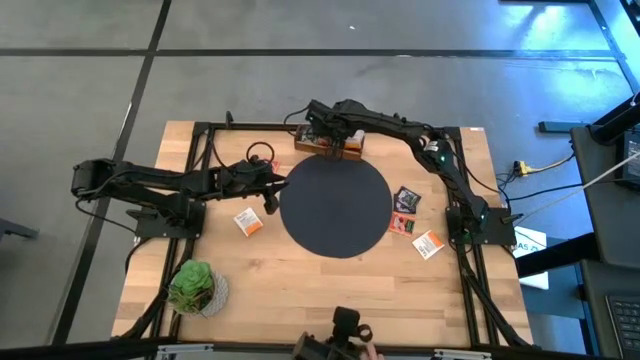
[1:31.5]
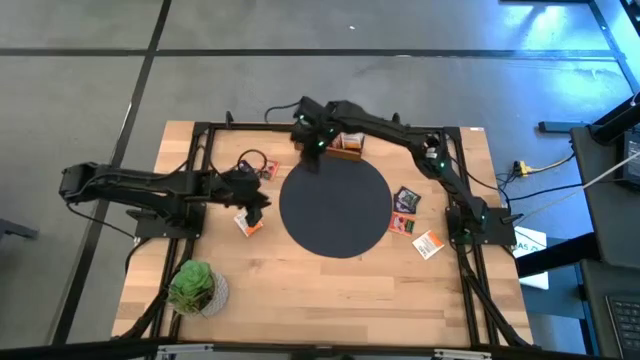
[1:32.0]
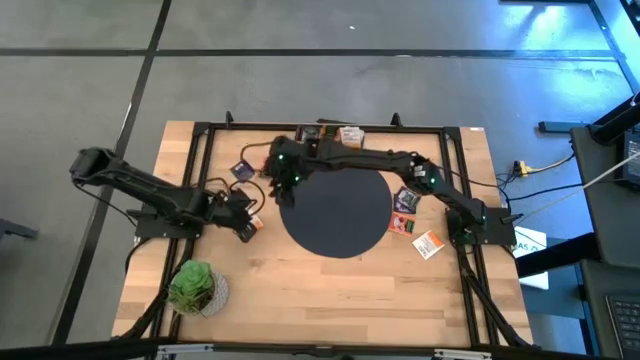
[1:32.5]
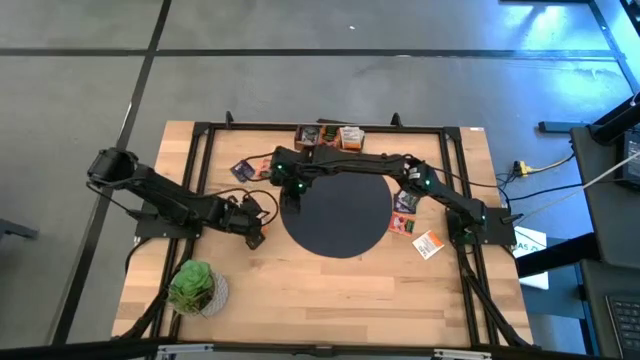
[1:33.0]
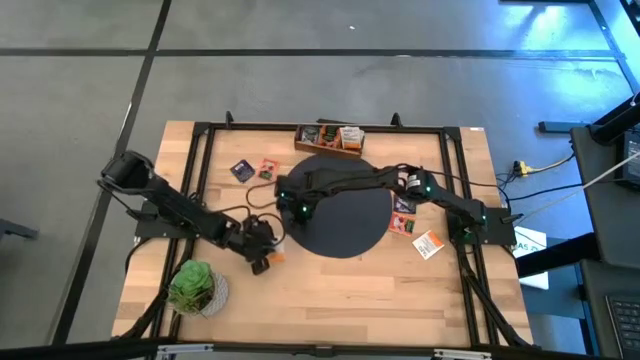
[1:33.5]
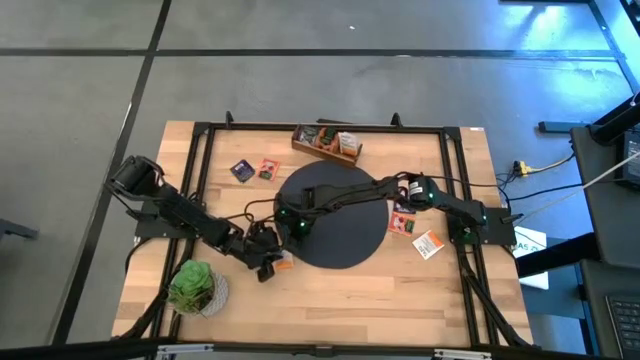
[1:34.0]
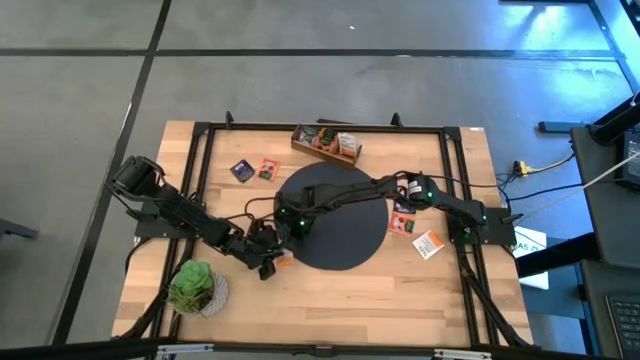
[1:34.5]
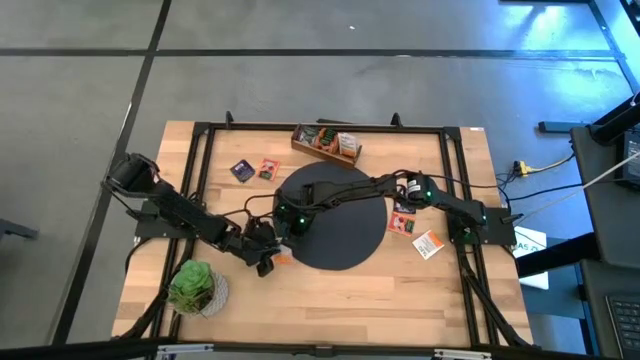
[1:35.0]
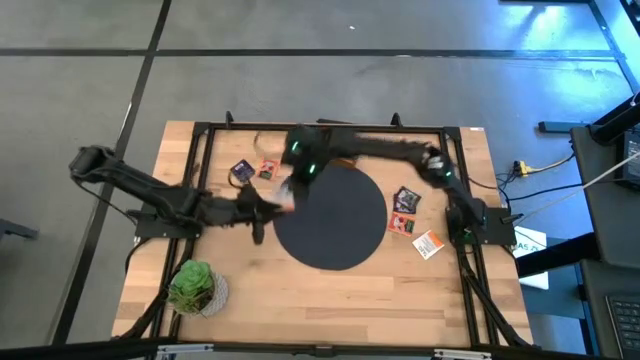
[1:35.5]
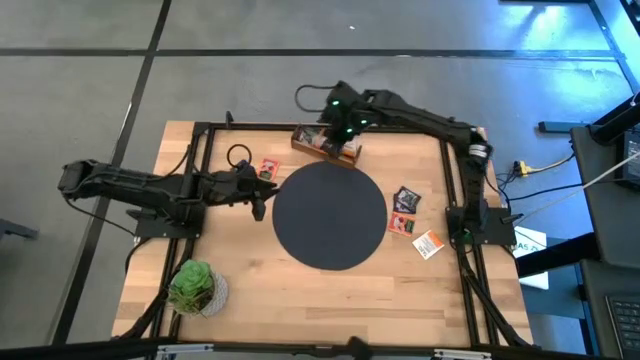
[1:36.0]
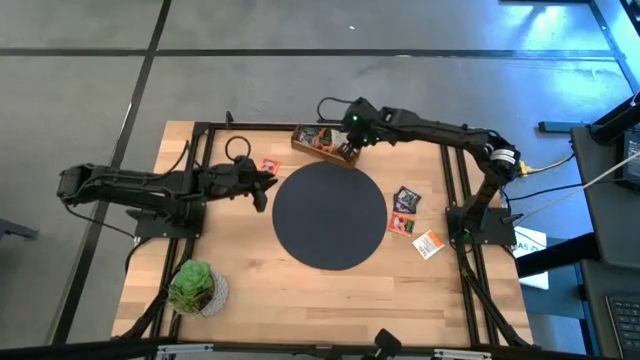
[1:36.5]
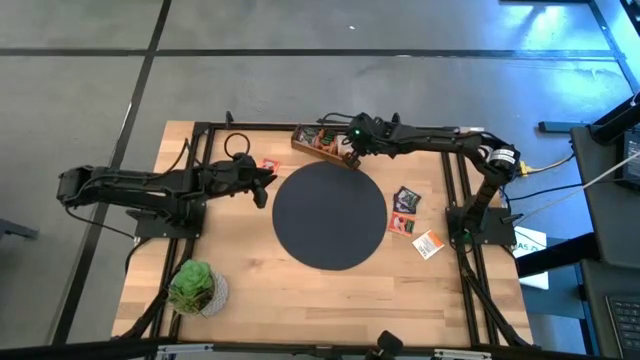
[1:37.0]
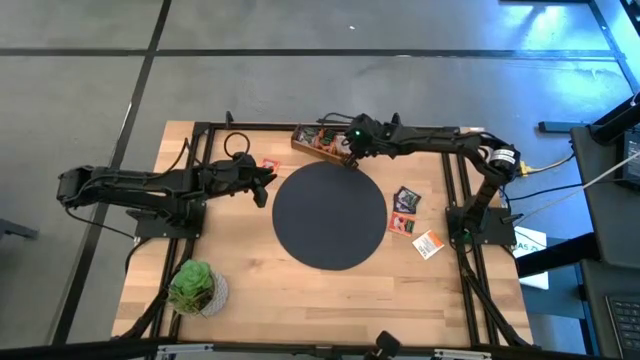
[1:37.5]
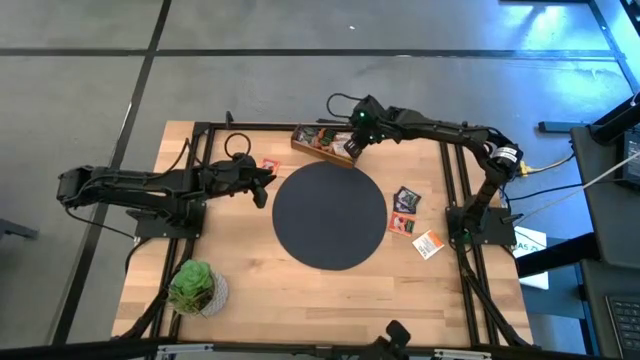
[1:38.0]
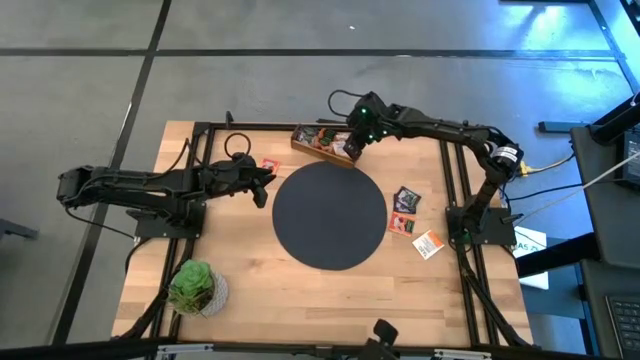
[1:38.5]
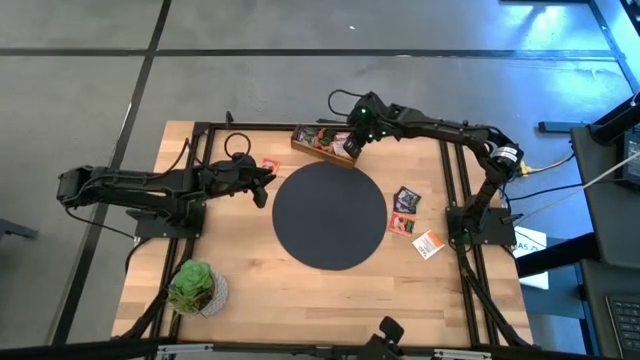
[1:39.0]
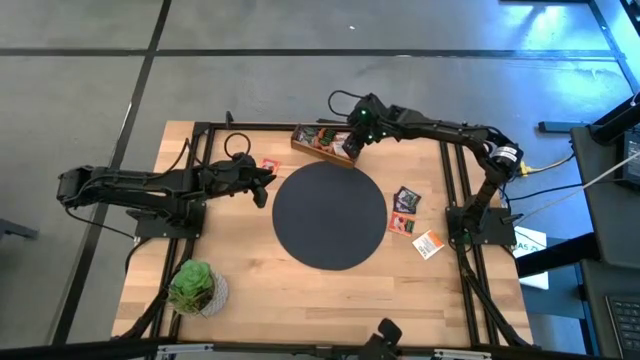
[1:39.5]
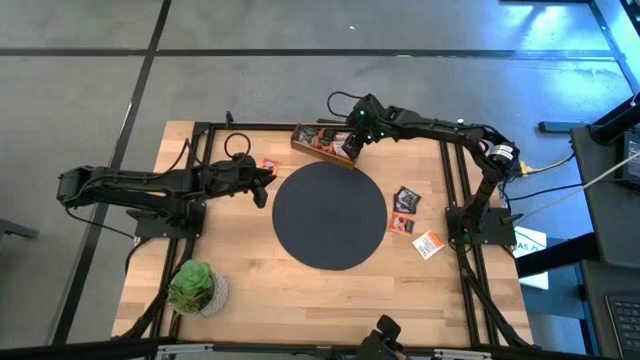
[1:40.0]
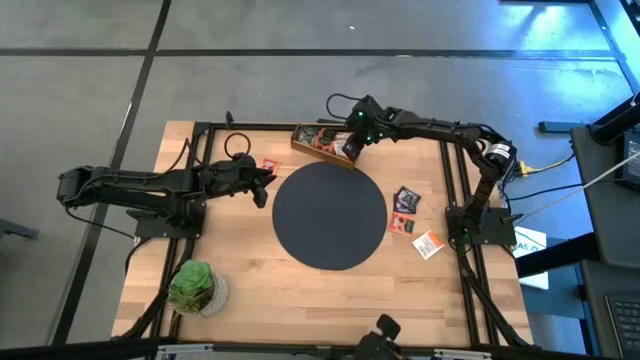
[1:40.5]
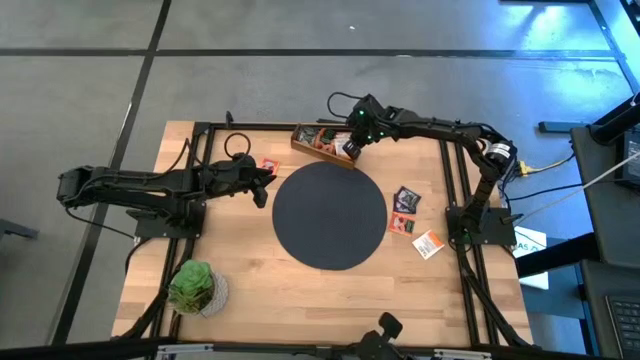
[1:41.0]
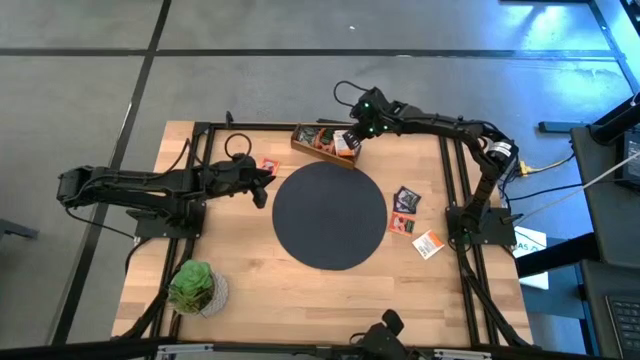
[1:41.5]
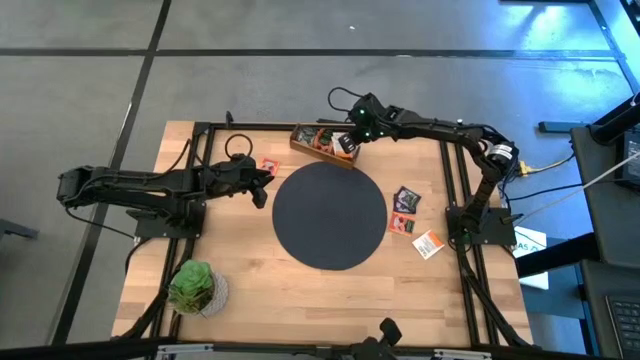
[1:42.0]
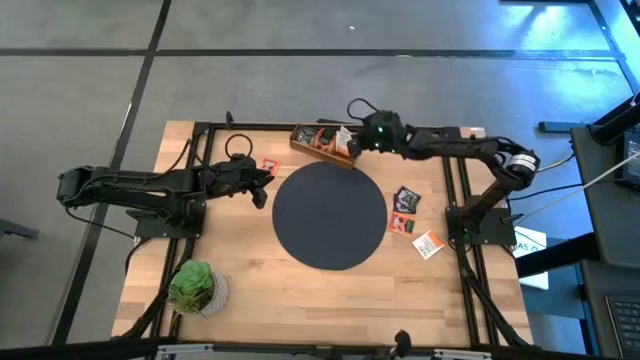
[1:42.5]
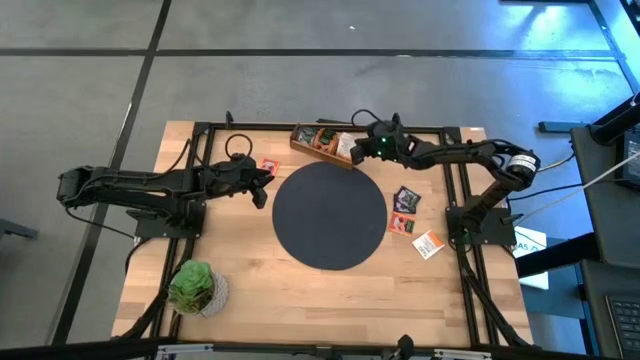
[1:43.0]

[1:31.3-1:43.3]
Task: Pick & Place Tea
Put the white tea bag into the right section of the wooden organizer

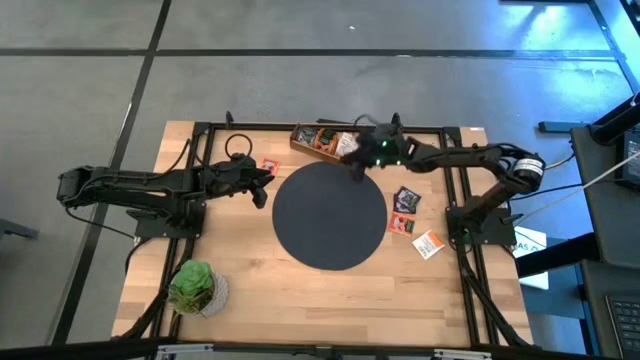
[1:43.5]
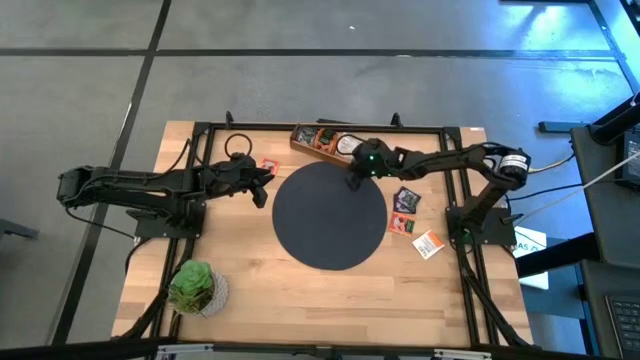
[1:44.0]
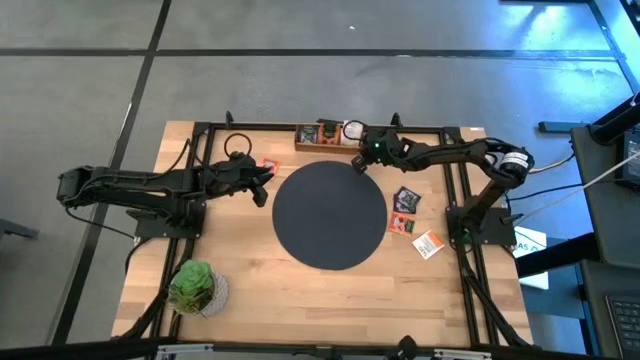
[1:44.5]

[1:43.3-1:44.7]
Adjust the wooden organizer

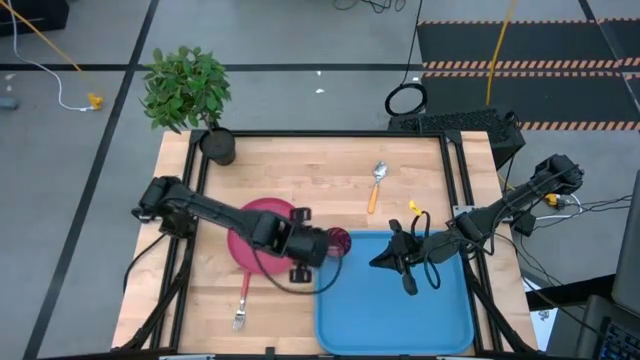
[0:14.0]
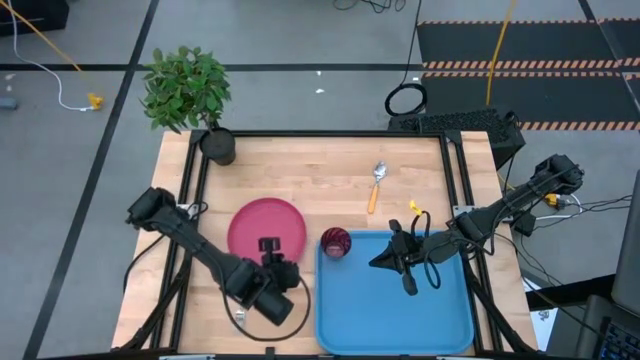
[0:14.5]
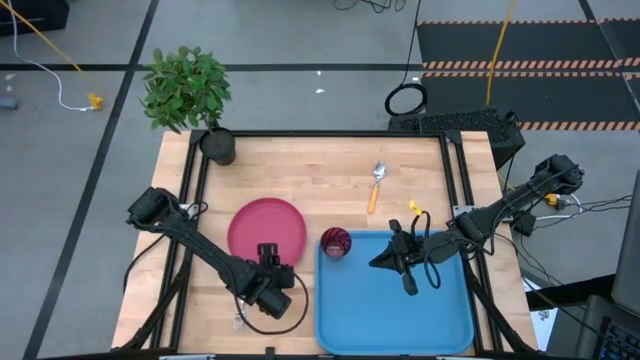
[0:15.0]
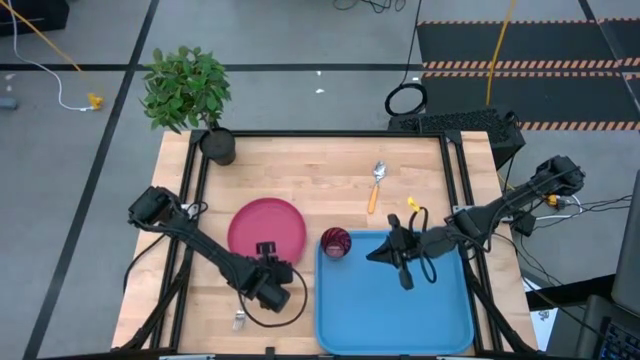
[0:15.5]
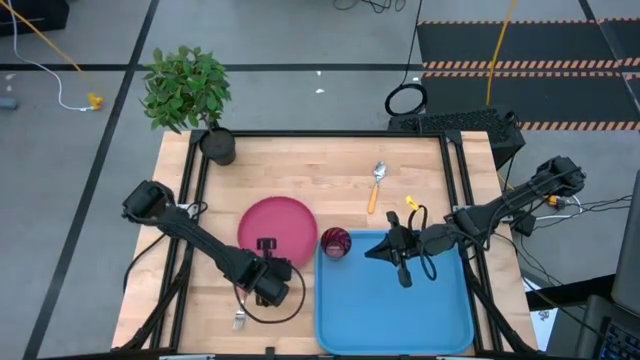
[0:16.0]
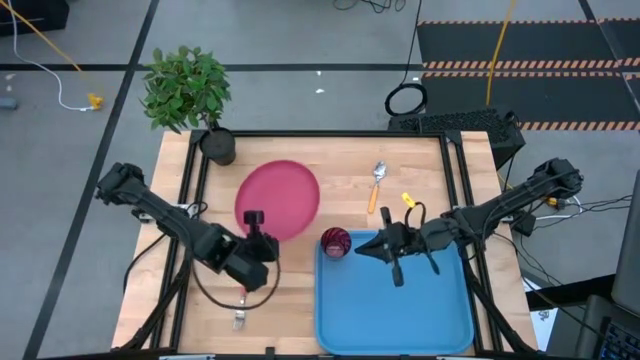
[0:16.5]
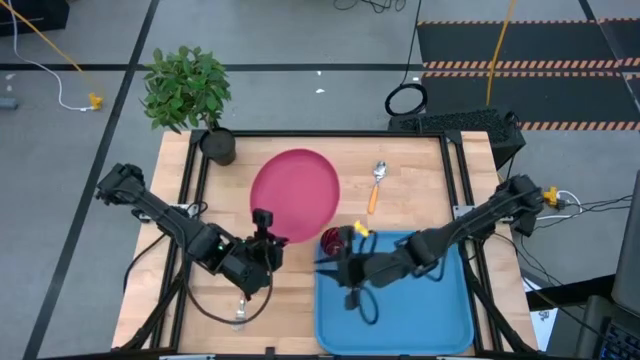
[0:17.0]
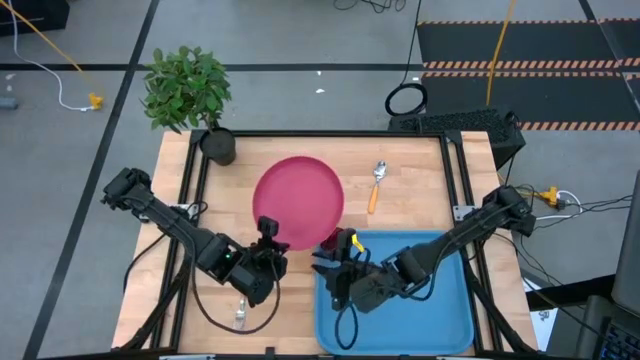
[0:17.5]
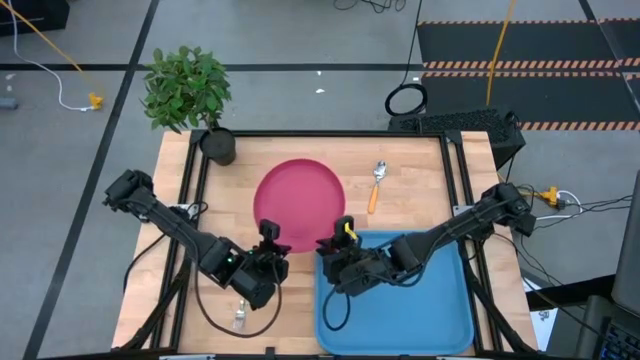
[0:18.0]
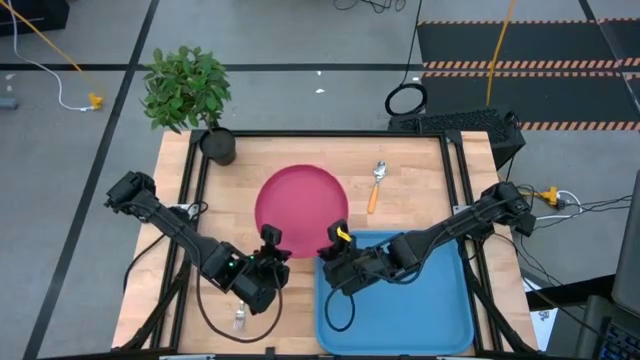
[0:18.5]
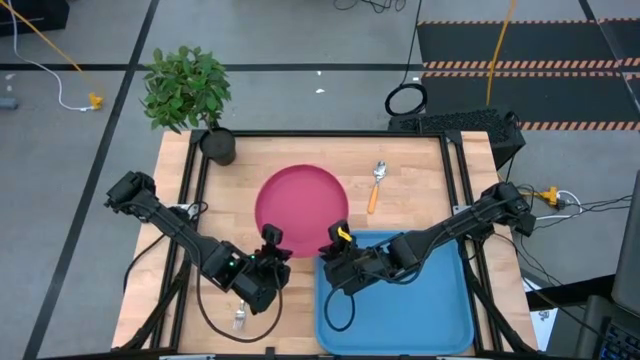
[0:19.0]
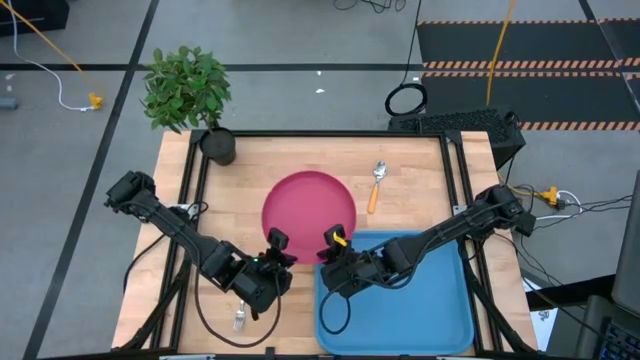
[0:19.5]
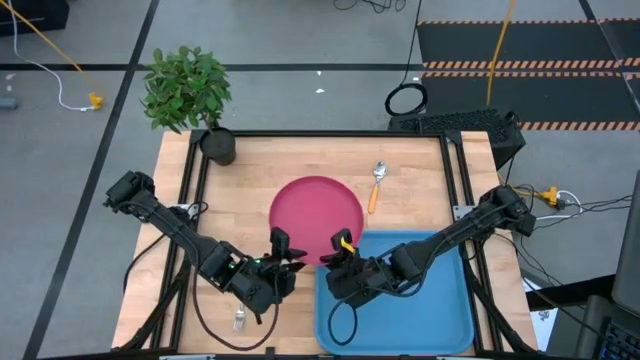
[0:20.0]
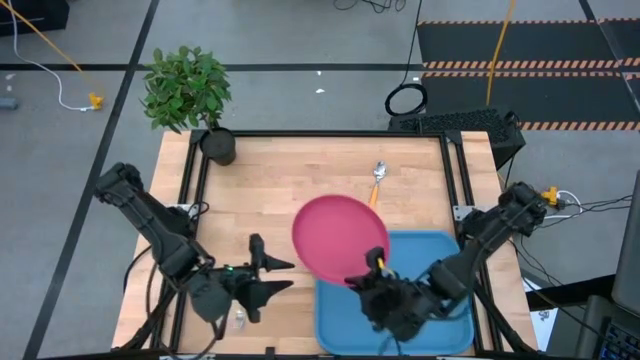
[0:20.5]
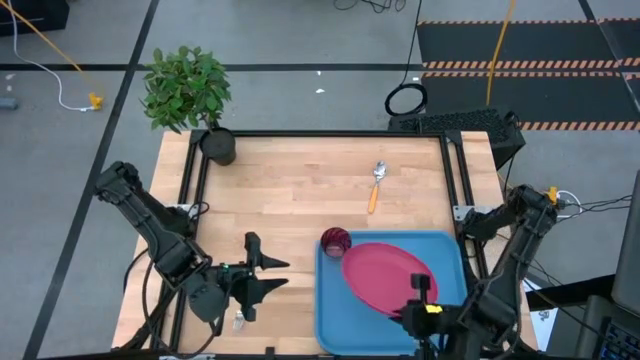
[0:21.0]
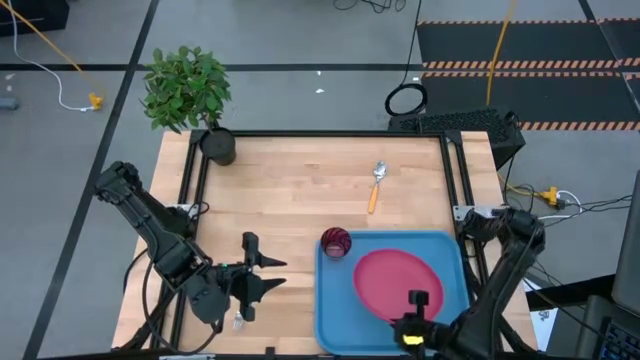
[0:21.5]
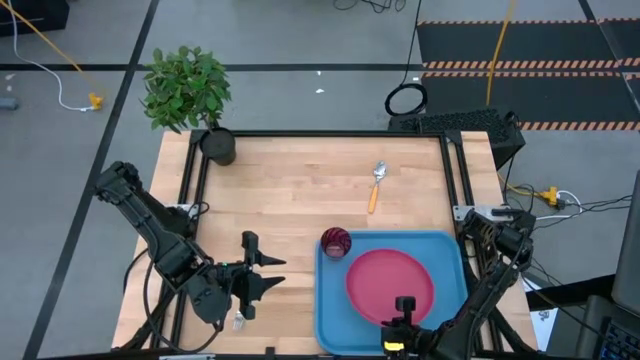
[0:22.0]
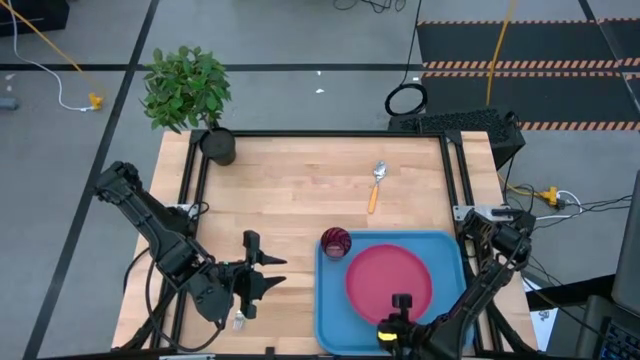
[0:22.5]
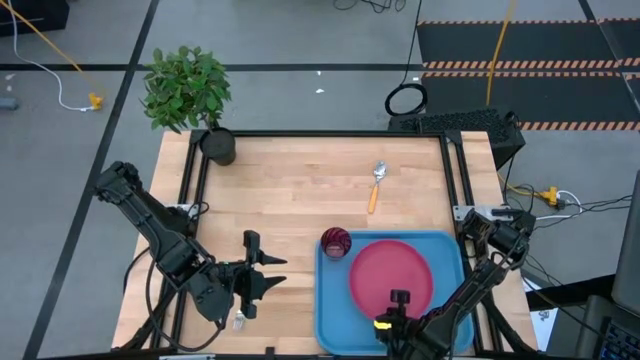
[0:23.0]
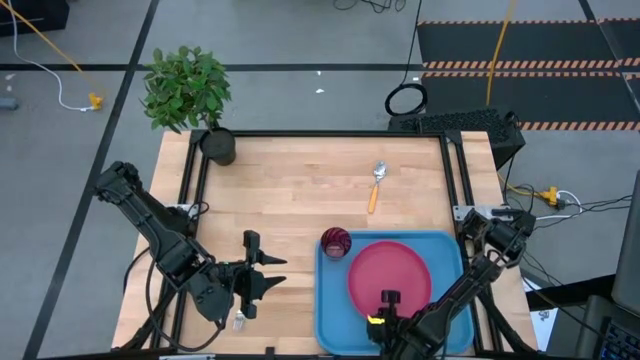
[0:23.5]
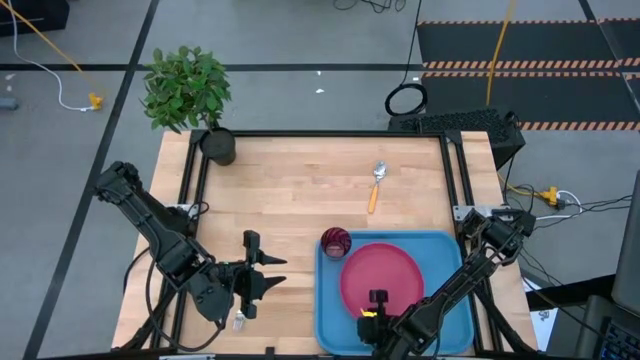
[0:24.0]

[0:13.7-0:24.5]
Task: Pick and place plate/cup/fork/spoon on tray
Put the red plate on the bottom right of the red cup on the blue tray
